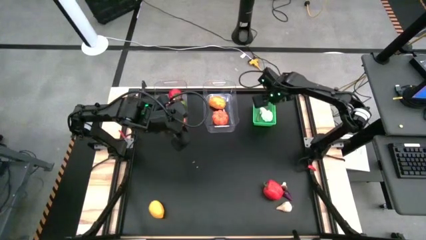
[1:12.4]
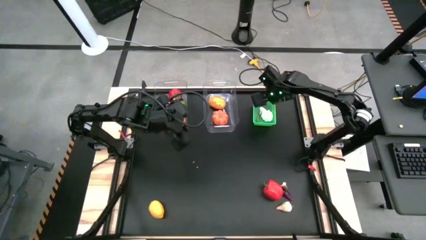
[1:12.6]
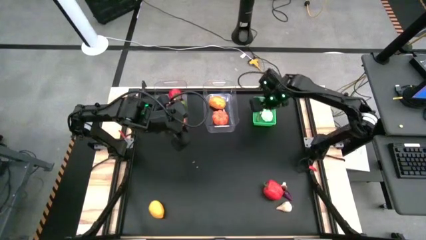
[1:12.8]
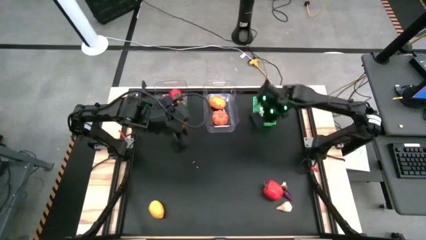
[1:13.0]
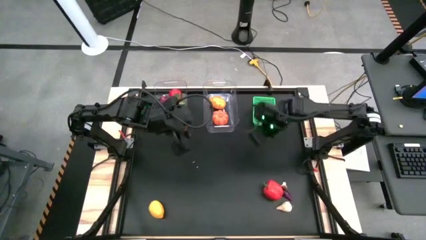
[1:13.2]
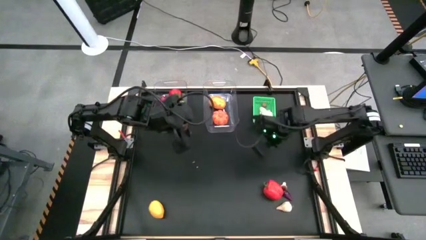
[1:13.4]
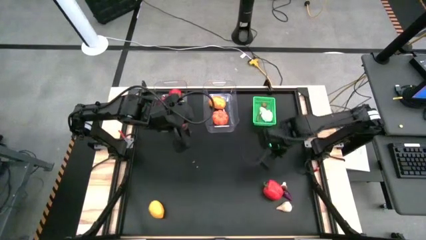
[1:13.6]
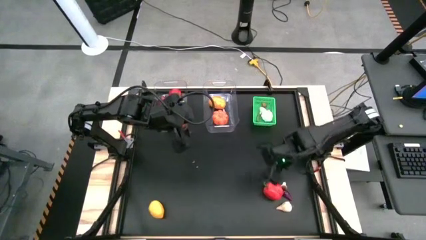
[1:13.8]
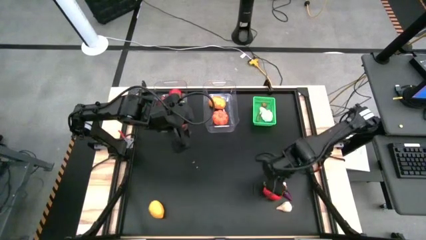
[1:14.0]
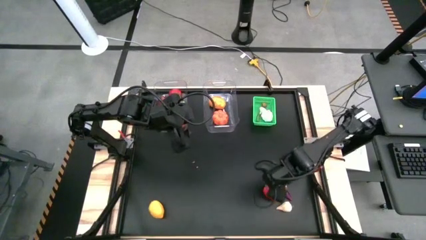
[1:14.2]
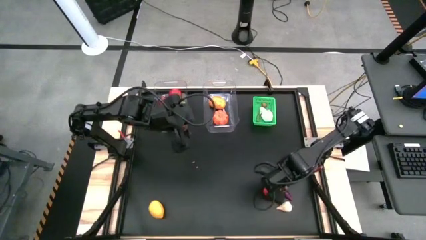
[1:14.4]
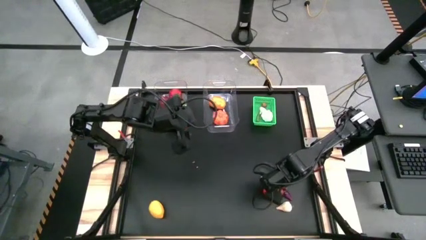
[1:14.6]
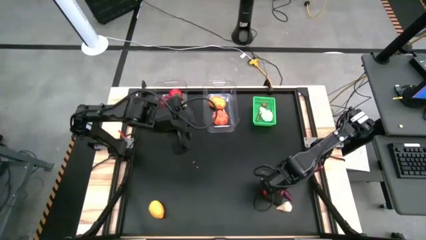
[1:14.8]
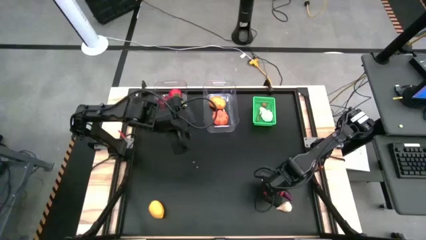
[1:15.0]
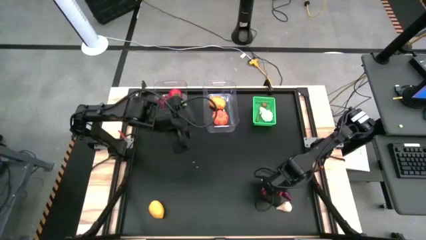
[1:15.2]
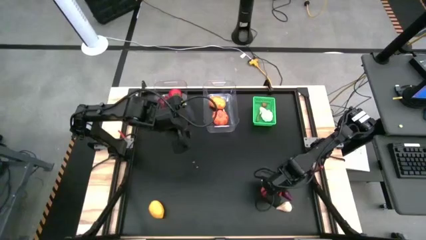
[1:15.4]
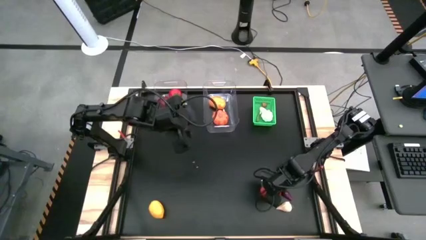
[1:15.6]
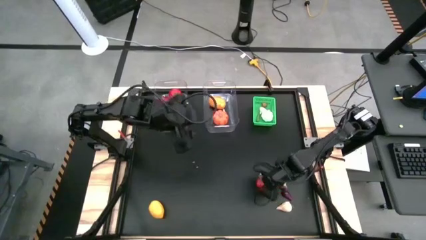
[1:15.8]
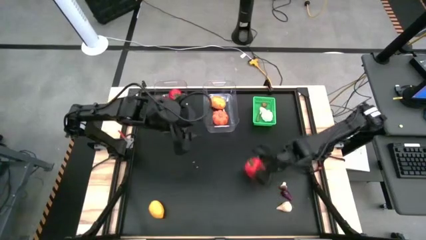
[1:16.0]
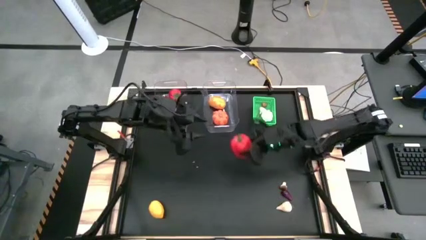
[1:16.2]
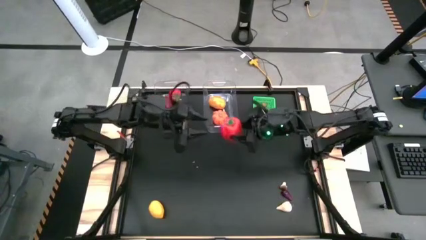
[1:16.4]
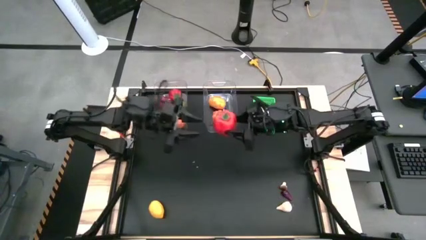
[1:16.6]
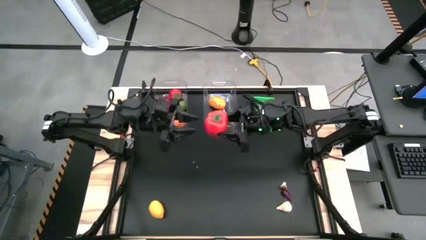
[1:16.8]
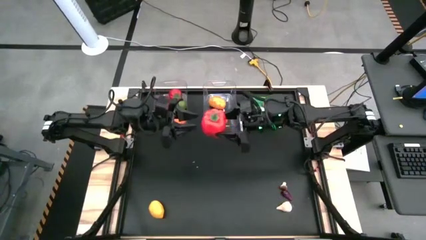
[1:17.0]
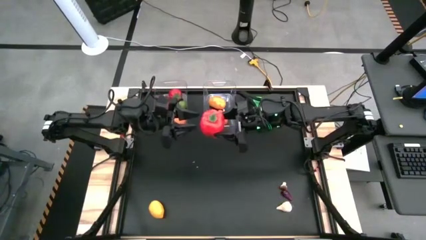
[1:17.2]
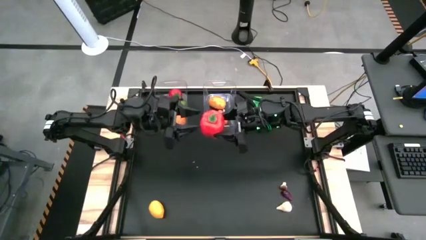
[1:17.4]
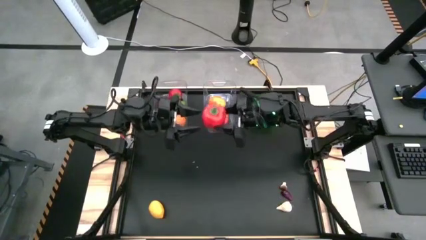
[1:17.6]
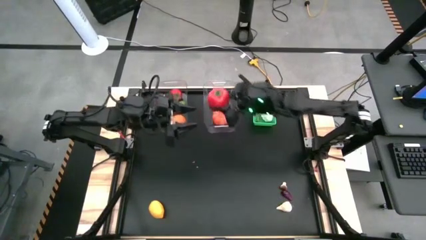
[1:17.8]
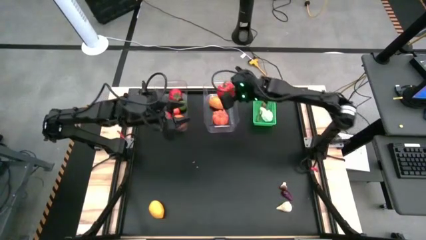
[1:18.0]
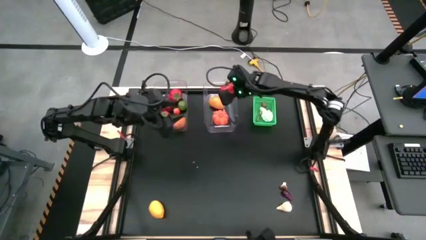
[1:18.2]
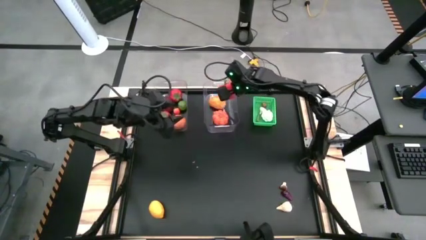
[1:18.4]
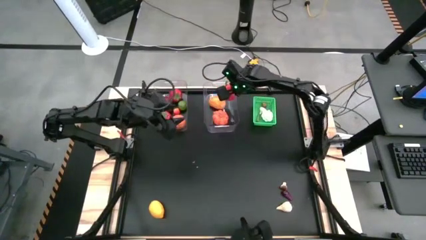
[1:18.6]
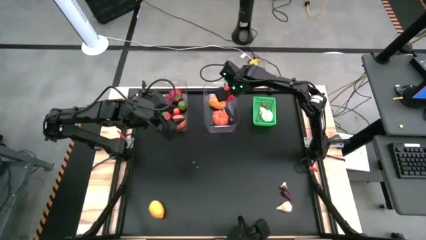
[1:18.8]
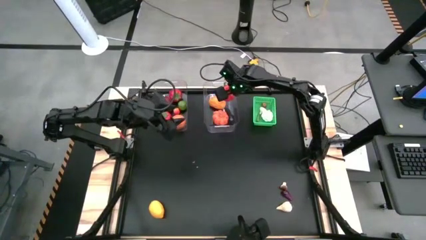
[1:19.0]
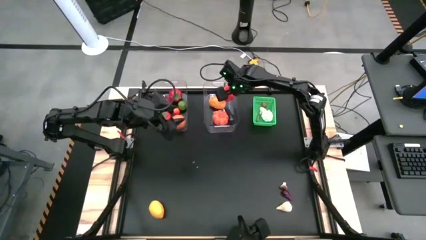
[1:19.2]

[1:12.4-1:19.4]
Task: Sort produce into baskets
Put the red bell pepper into the right transparent bin

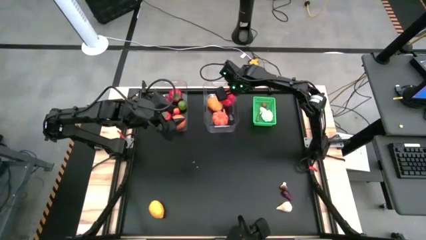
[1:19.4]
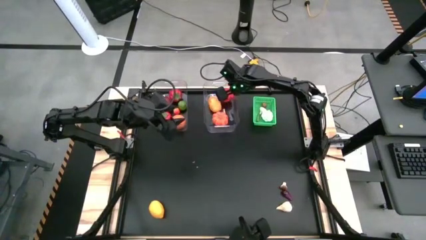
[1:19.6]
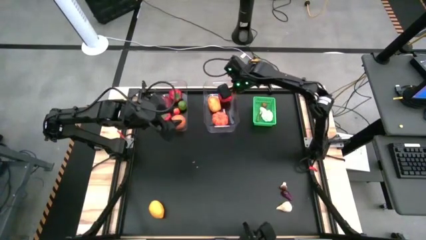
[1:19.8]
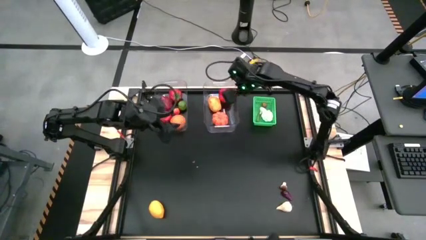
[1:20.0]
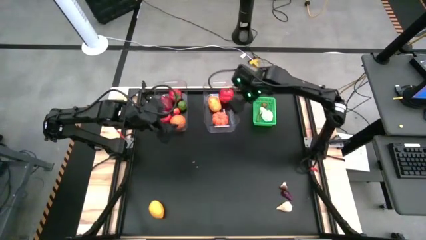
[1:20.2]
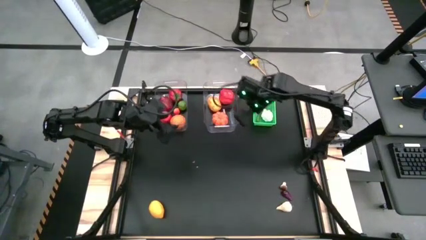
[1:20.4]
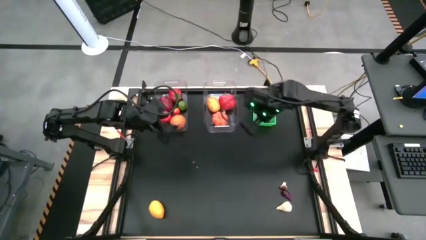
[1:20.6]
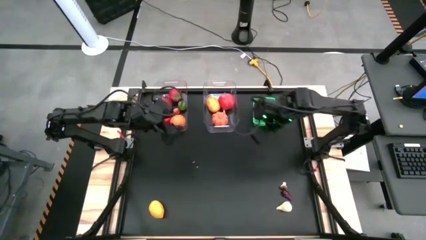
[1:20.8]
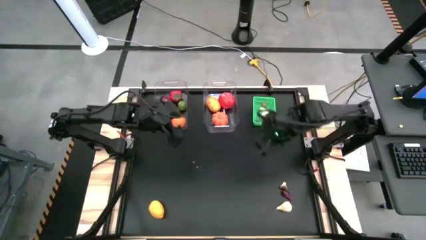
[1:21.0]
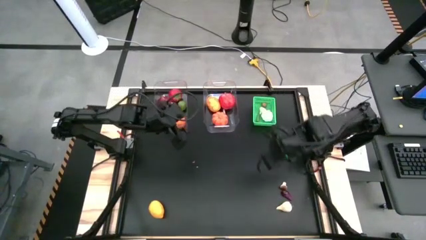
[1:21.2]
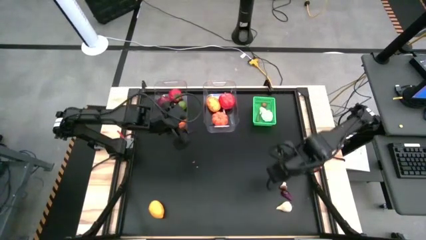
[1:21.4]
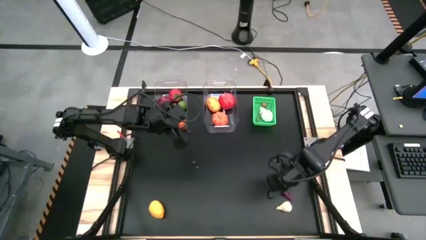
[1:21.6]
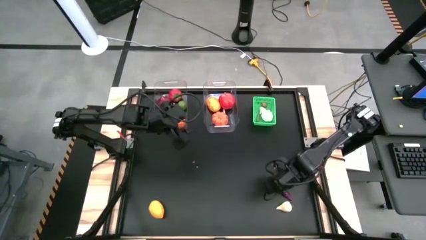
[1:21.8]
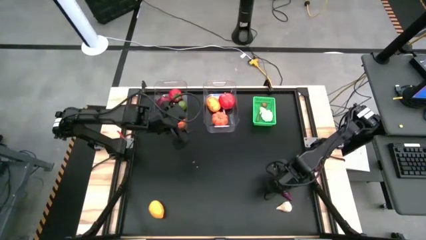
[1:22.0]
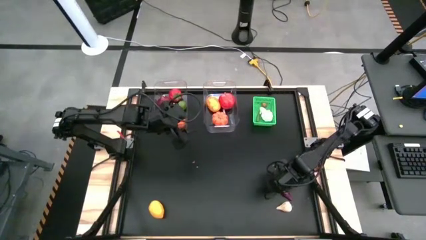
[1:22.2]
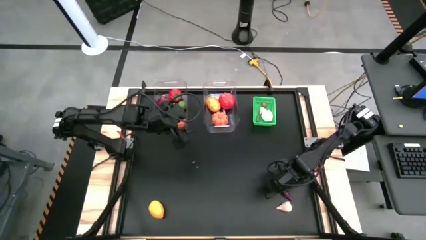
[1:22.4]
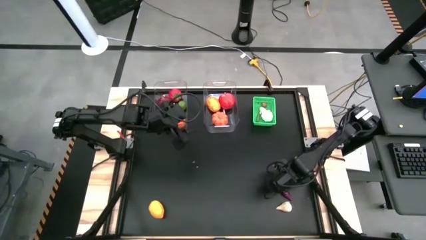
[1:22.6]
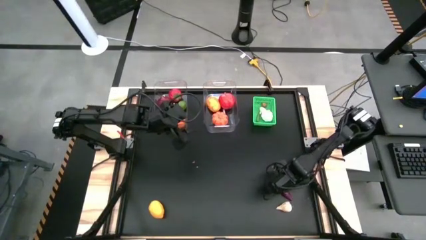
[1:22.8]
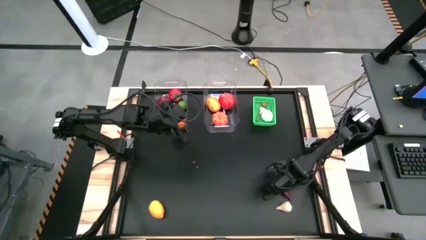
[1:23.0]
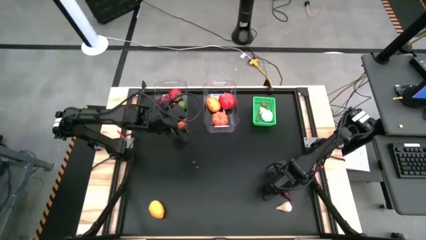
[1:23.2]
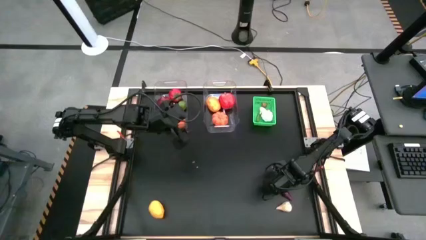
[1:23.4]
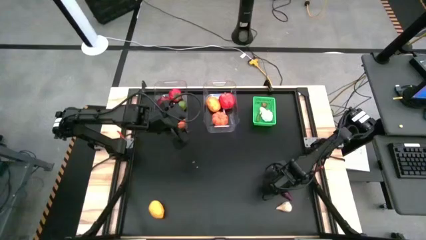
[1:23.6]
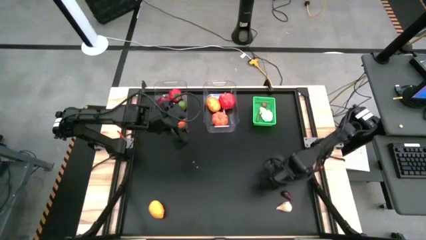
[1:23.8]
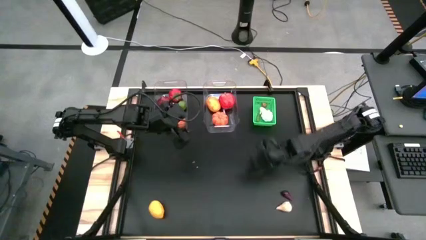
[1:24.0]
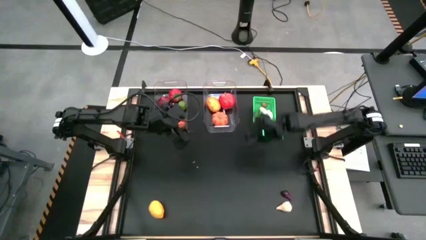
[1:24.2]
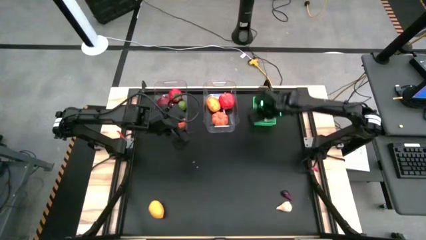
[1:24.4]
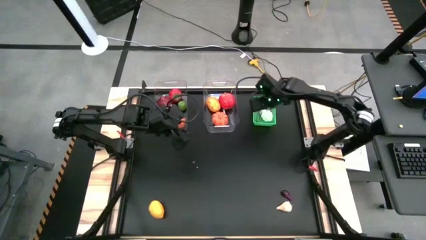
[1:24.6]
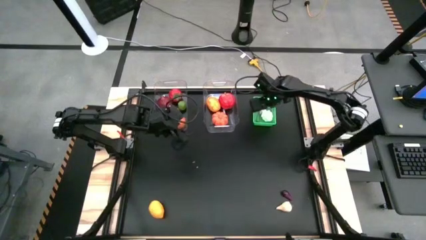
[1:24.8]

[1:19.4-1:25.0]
Put the mushroom into the green bin

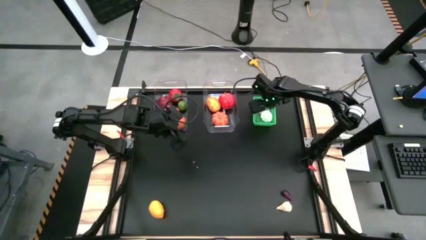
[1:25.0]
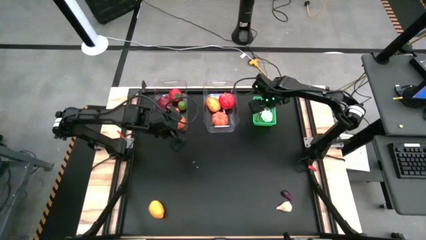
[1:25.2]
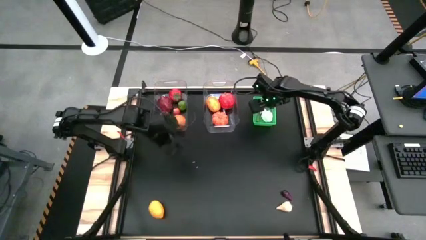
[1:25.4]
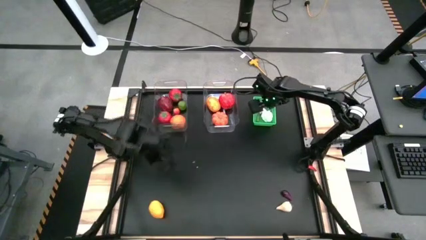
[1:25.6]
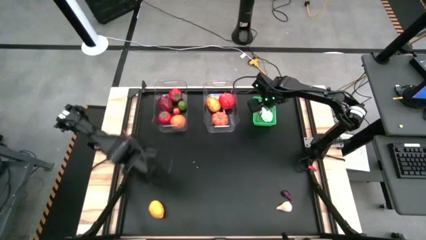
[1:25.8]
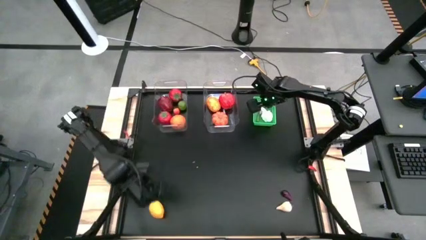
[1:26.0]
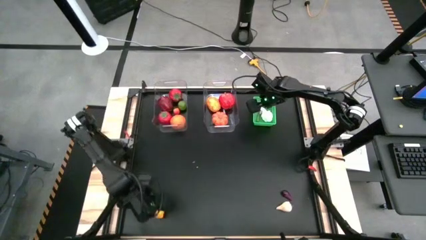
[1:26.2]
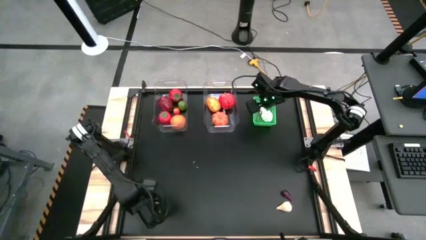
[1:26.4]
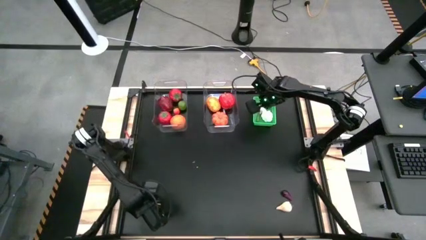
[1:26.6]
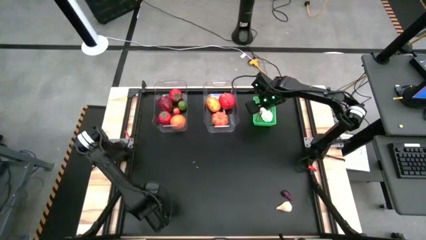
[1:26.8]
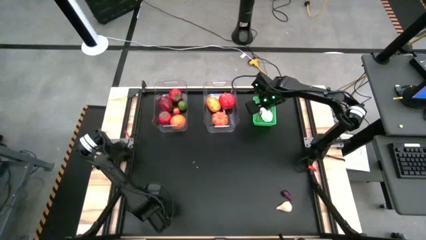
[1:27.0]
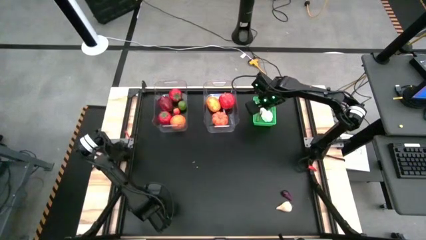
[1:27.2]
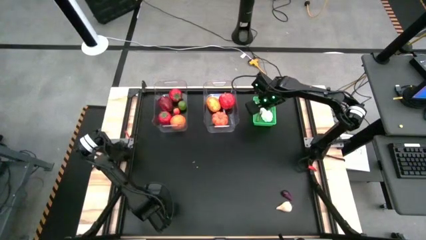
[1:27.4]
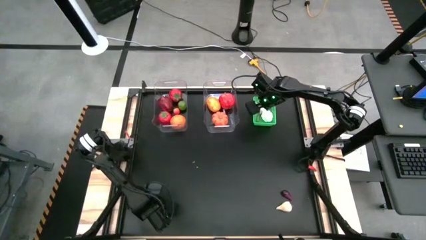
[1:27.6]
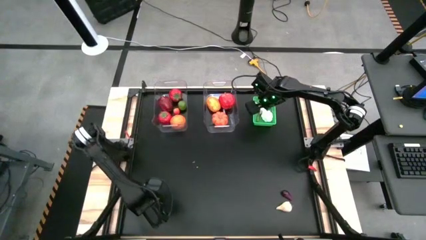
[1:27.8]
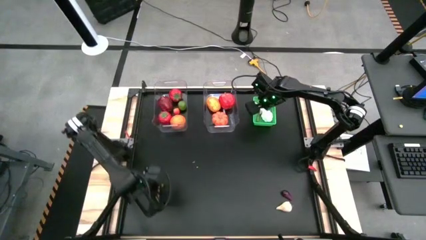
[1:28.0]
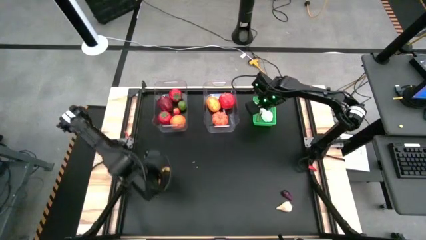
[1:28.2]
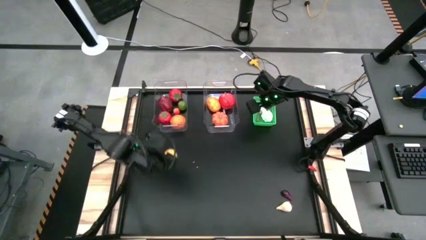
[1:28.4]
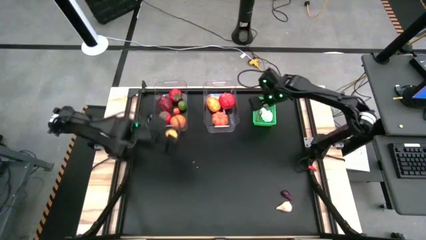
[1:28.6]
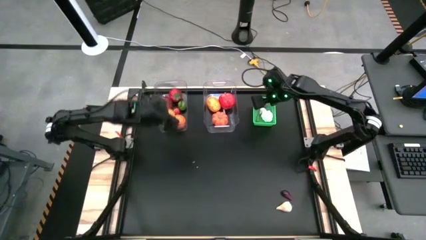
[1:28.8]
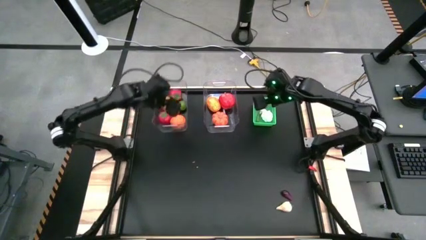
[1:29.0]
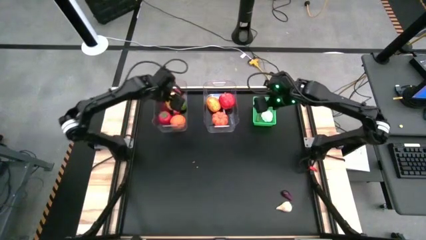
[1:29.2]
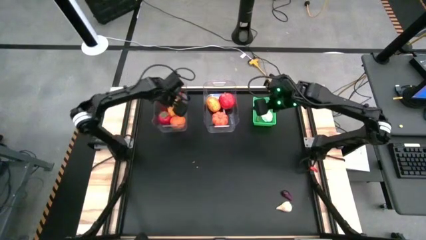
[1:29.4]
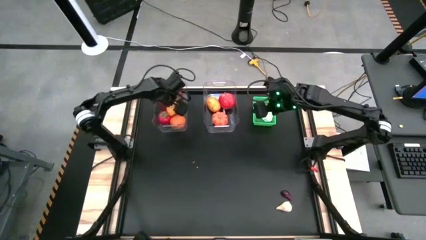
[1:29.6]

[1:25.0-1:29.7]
Put the lemon into the left transparent bin
